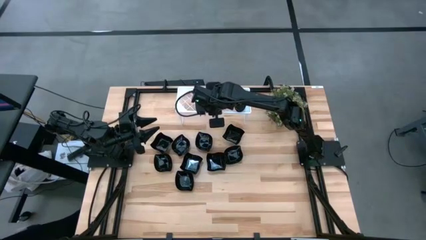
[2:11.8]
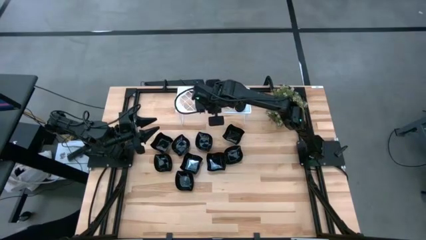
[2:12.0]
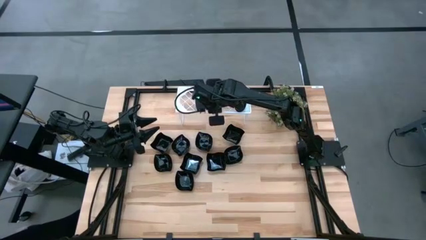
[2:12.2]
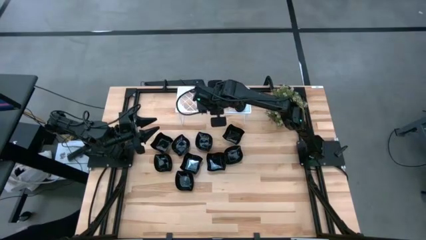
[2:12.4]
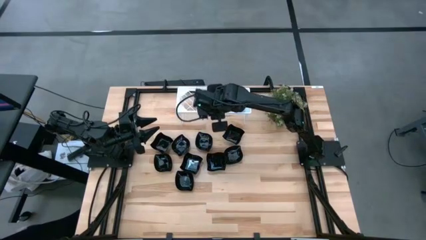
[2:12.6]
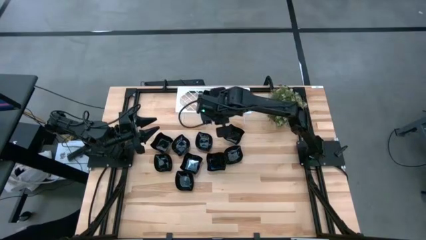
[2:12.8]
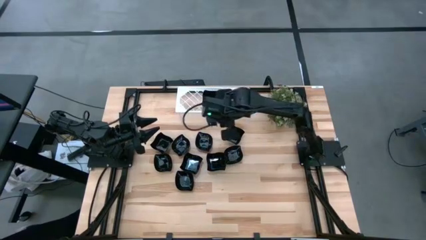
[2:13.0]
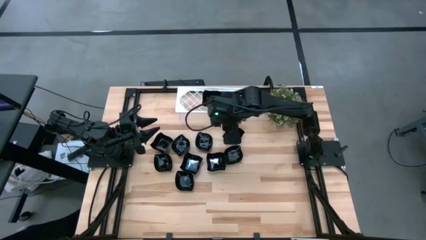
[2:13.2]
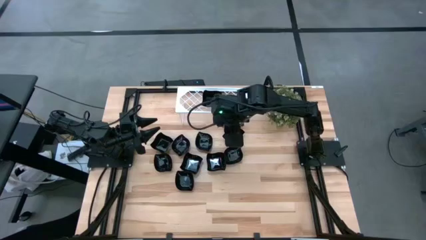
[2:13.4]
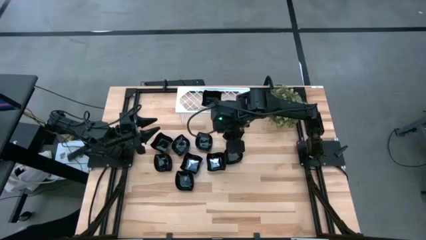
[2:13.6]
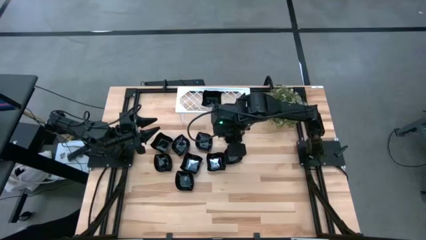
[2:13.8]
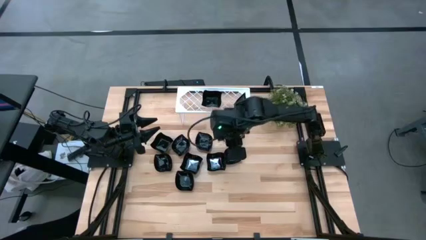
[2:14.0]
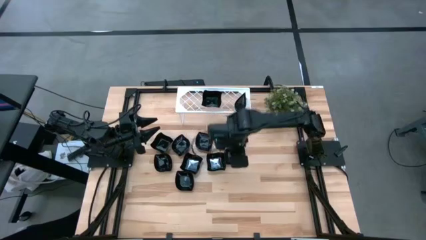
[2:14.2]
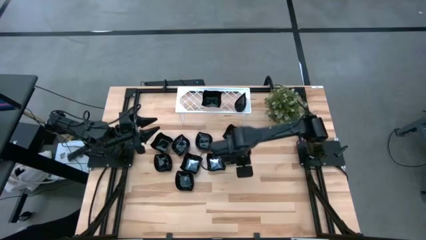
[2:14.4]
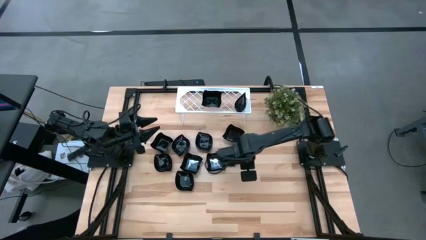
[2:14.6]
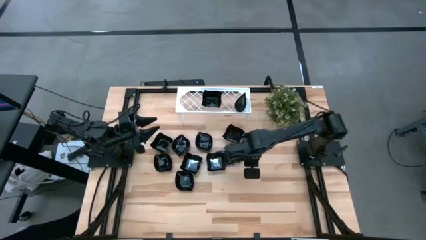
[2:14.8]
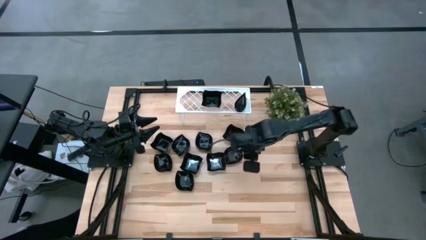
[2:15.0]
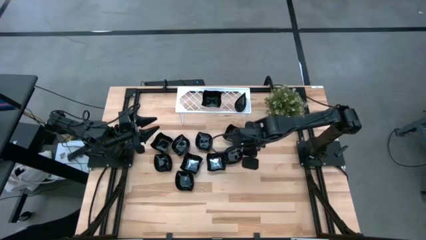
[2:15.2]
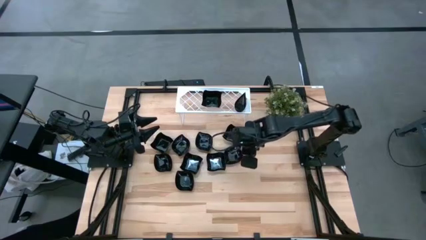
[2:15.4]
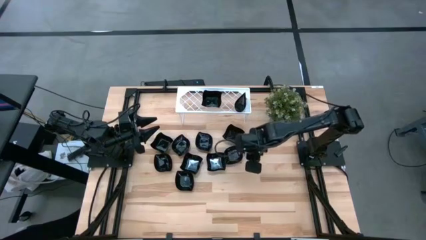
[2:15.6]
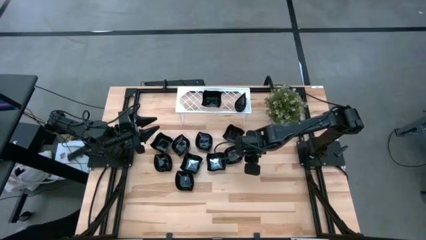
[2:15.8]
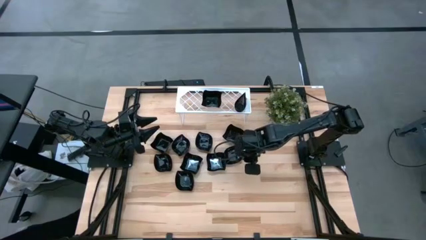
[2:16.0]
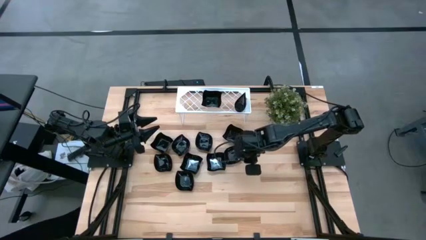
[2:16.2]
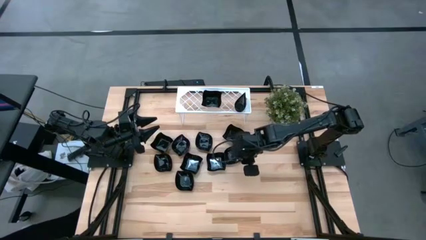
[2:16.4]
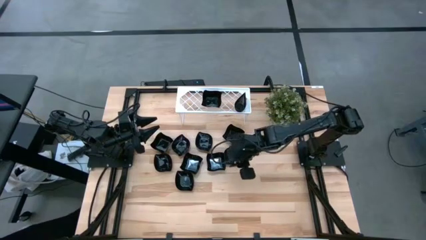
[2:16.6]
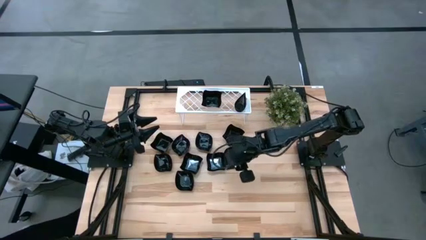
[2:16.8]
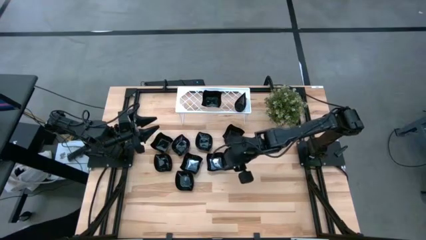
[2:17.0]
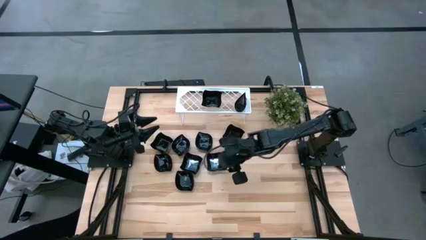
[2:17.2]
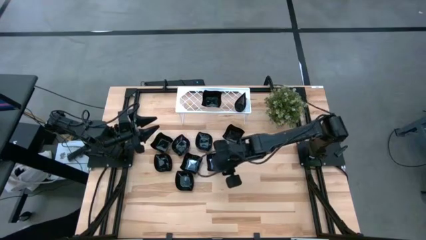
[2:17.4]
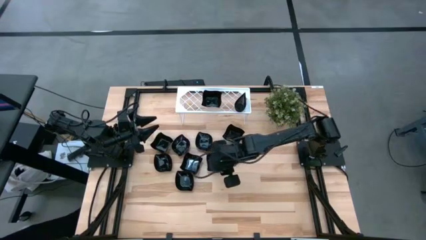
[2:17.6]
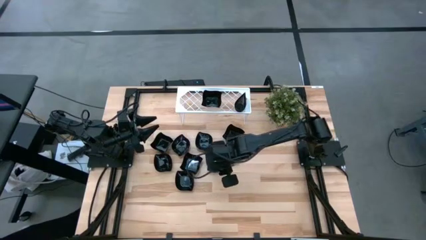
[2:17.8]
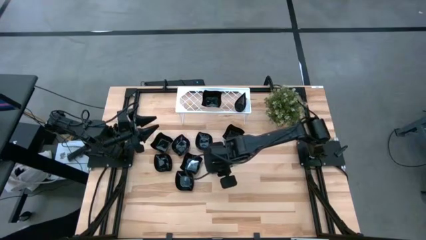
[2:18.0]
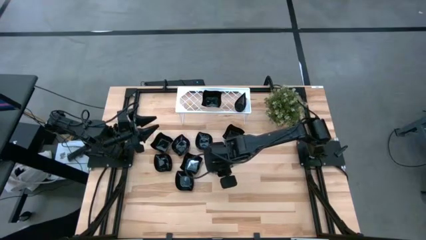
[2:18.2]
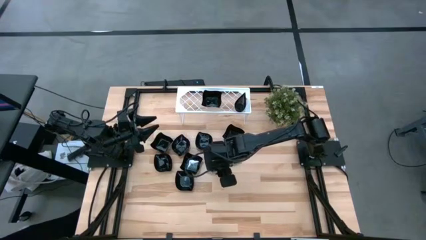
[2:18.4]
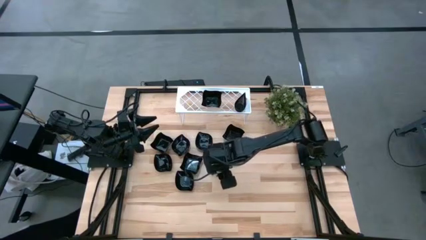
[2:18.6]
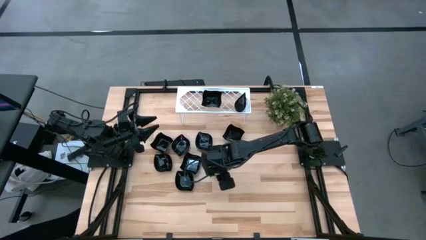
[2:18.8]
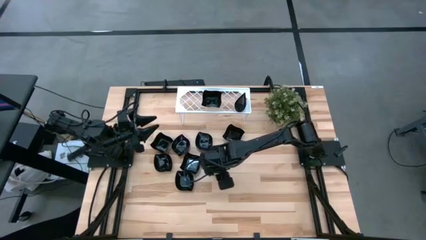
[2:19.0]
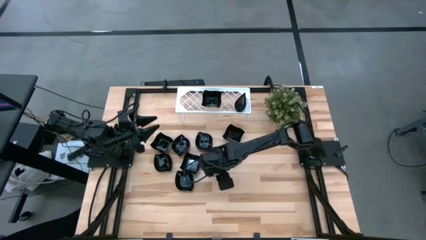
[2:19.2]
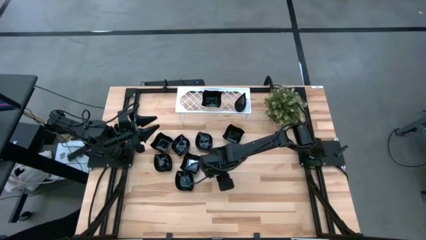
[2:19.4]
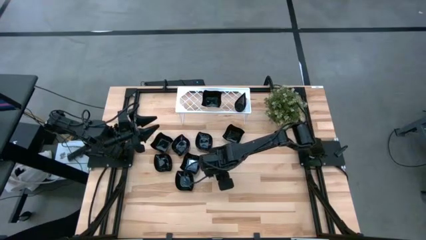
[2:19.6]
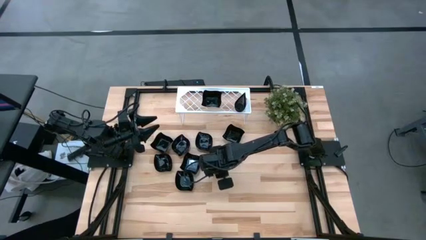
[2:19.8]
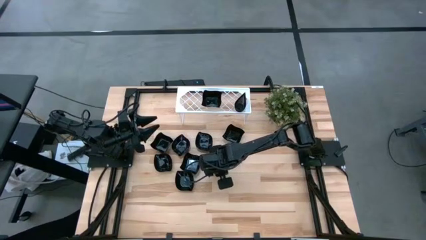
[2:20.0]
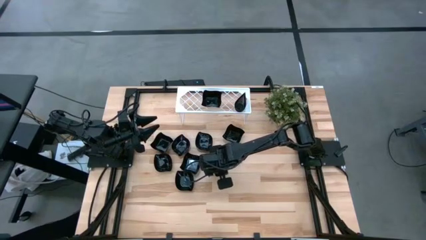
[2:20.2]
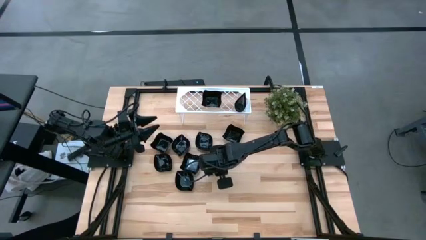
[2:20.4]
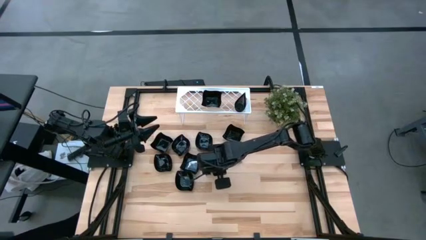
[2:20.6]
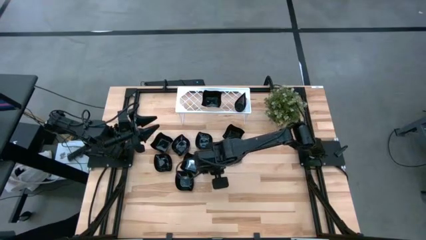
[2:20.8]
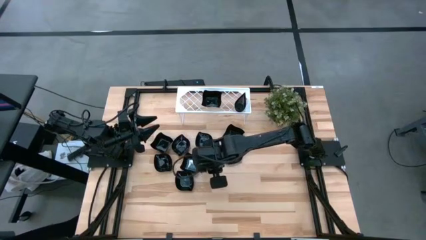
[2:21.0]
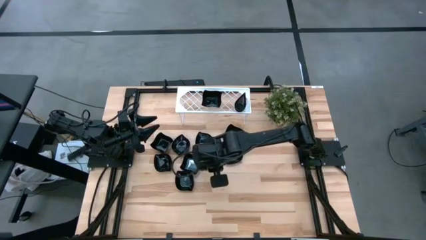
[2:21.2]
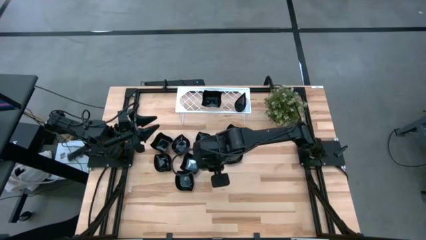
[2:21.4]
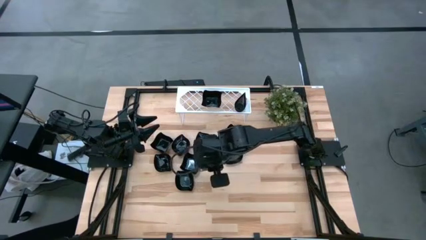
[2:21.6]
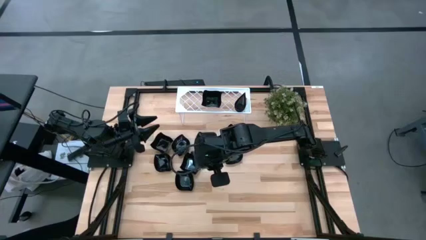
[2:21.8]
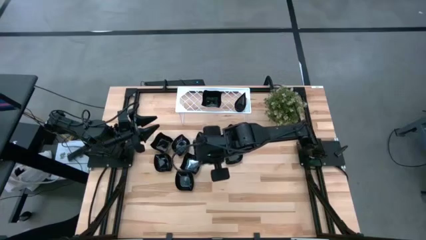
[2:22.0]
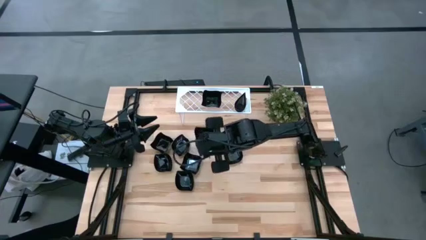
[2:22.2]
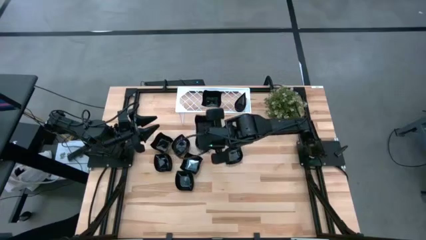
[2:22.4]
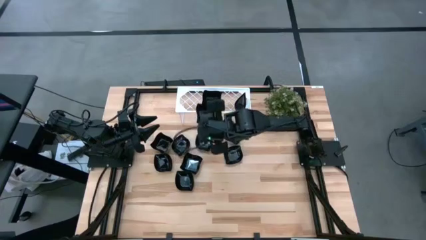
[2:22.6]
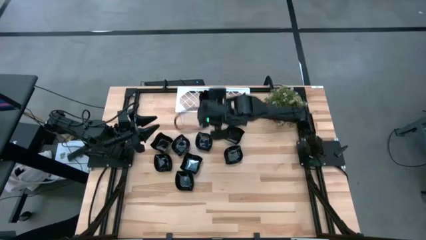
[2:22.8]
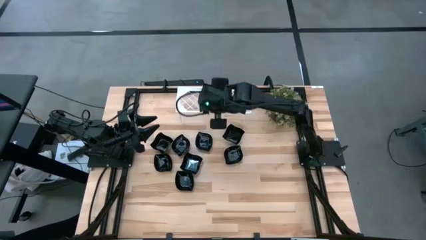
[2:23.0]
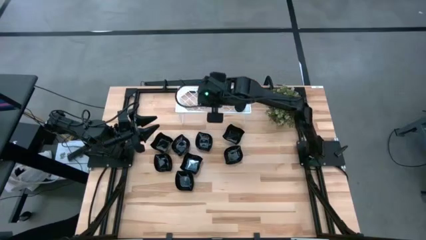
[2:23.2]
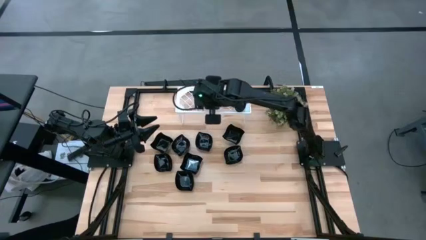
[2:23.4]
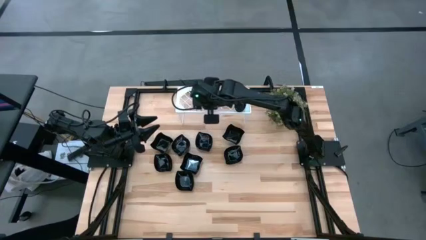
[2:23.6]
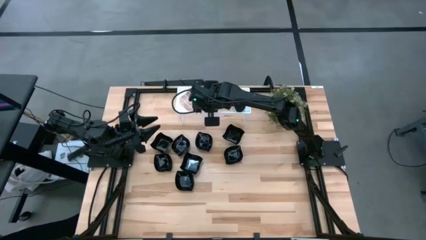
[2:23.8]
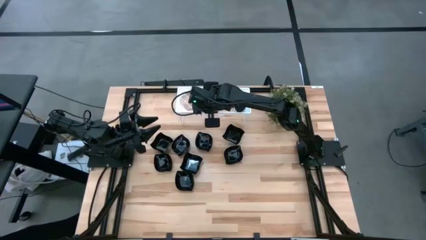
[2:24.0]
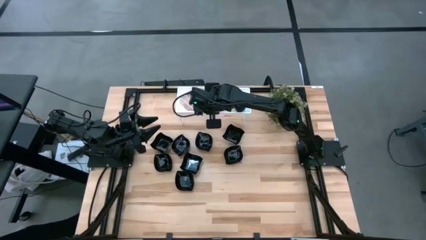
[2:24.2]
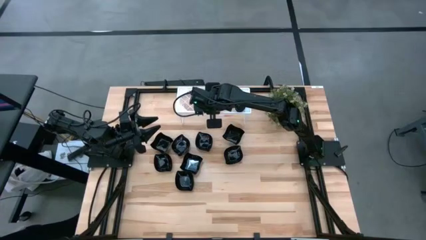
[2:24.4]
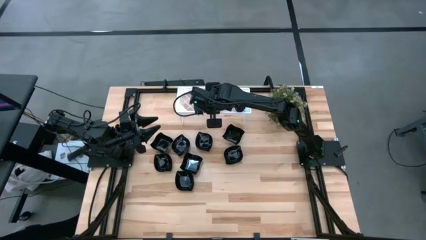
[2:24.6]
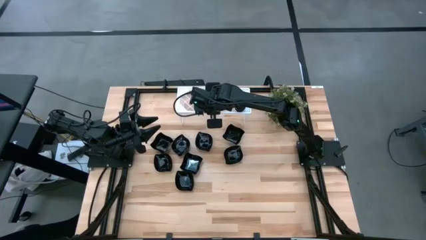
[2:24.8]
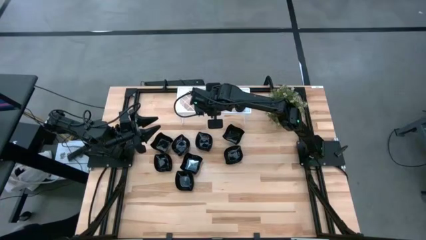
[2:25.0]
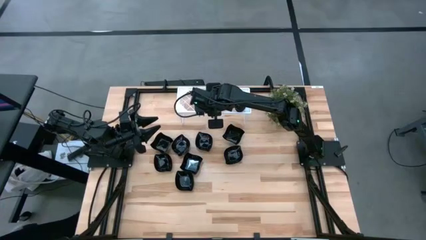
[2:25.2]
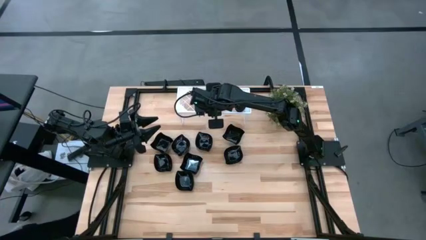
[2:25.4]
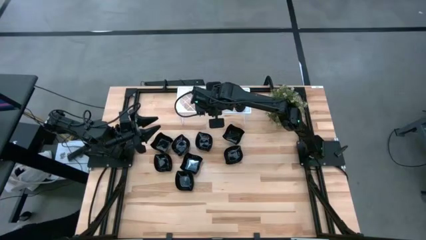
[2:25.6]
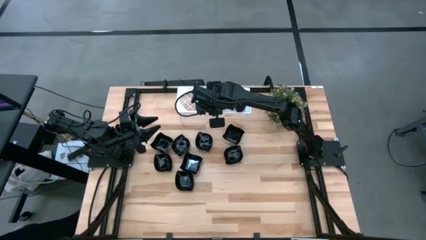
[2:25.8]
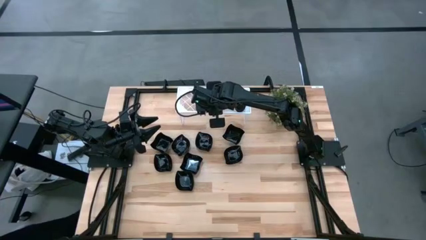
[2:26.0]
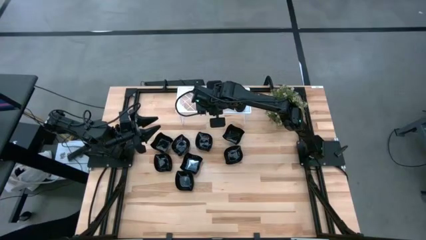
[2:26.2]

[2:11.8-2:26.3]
Task: Pick & Place Mini shaped plates
Stack the distorted square plate on top of the distorted square plate on the shelf
